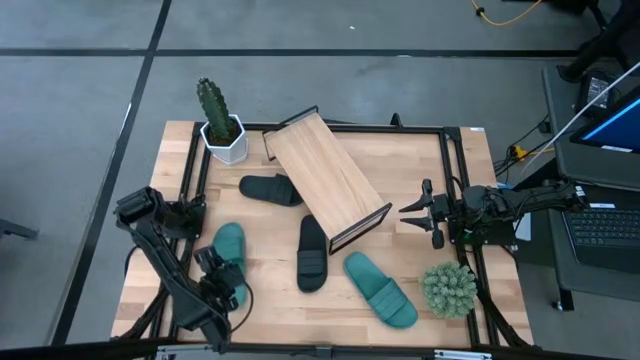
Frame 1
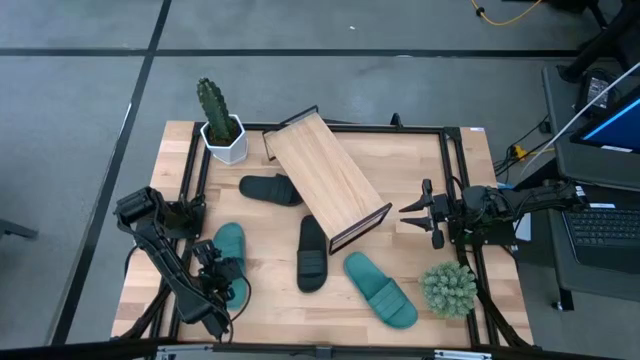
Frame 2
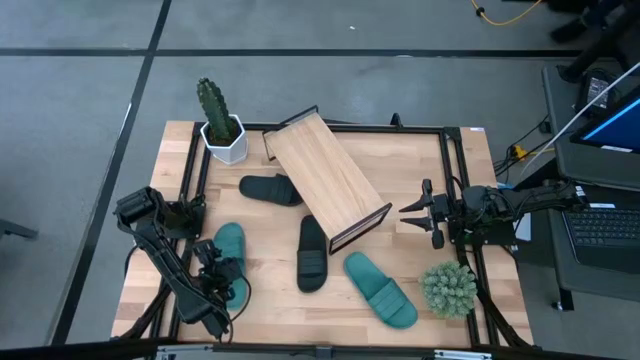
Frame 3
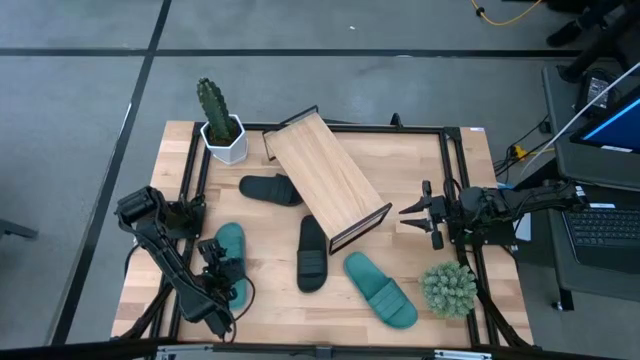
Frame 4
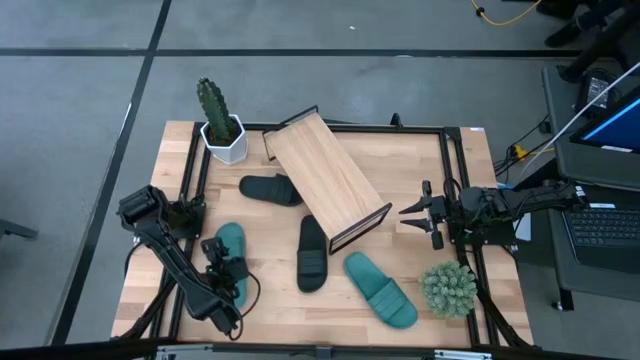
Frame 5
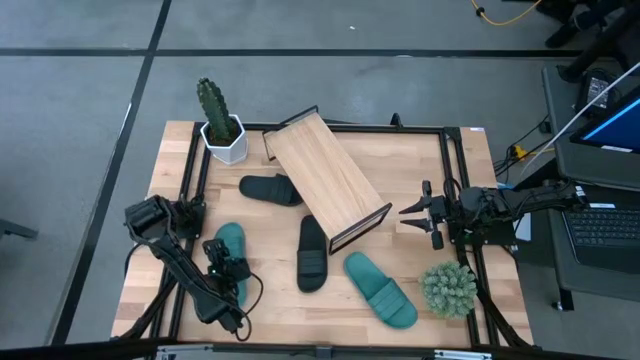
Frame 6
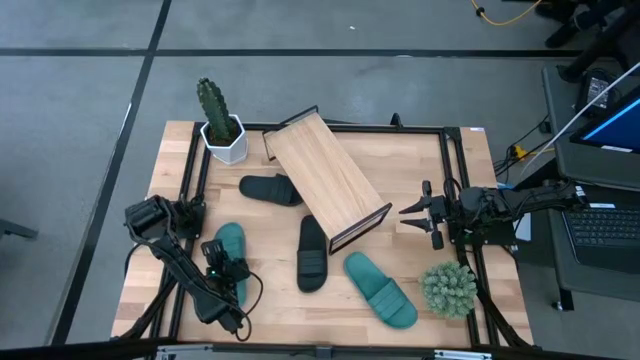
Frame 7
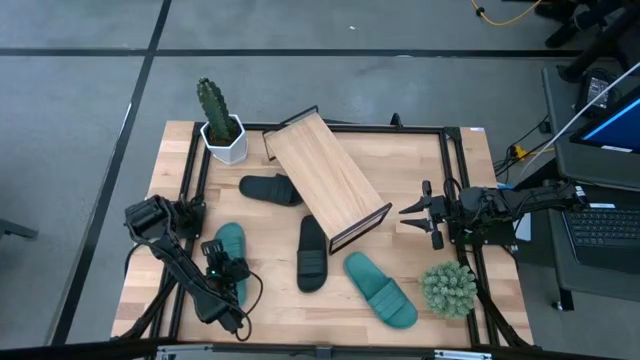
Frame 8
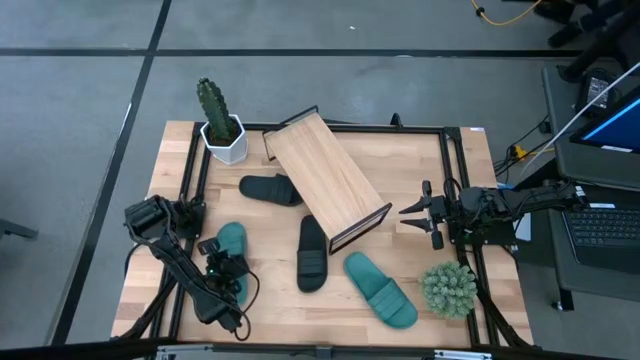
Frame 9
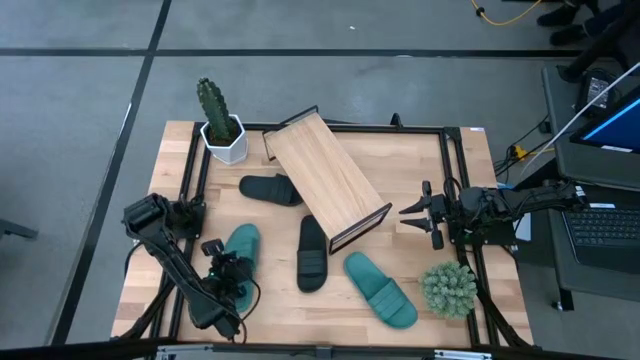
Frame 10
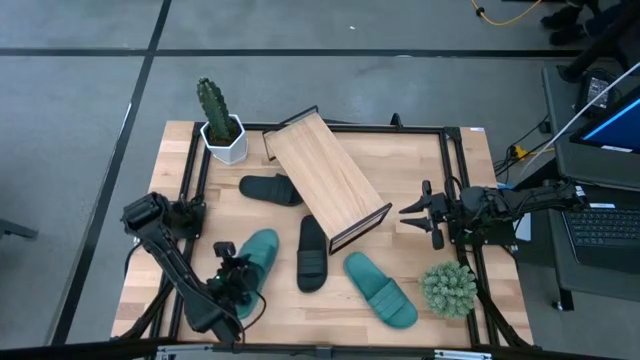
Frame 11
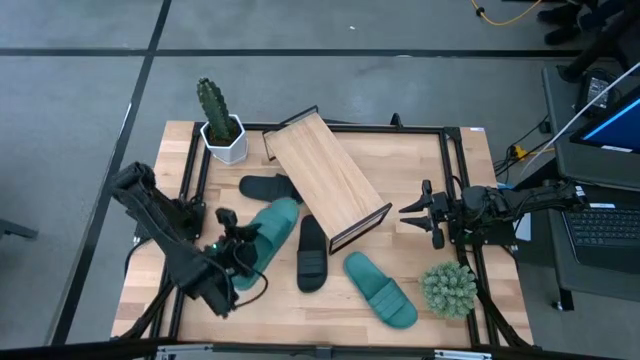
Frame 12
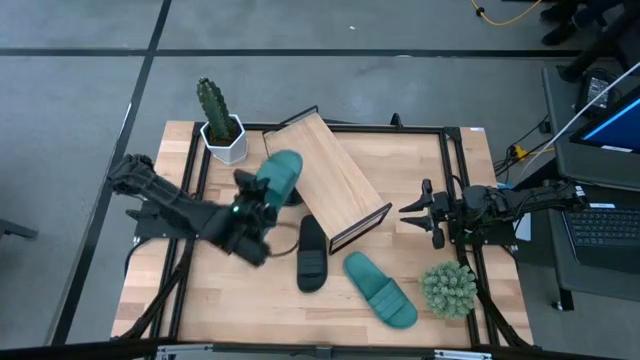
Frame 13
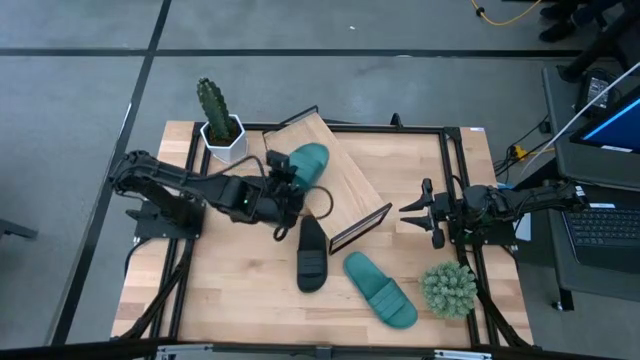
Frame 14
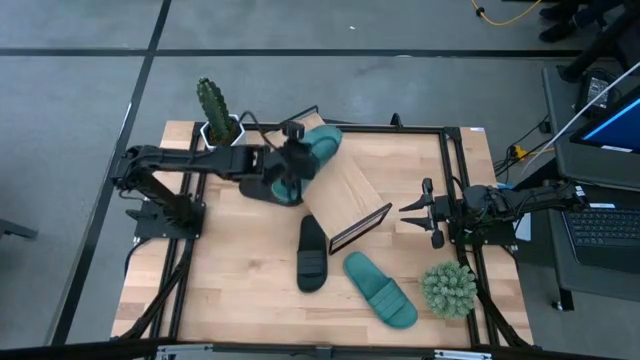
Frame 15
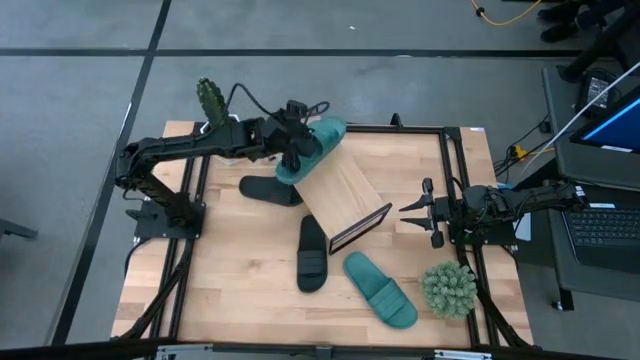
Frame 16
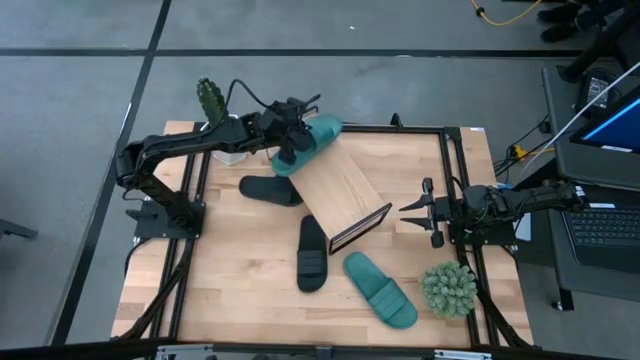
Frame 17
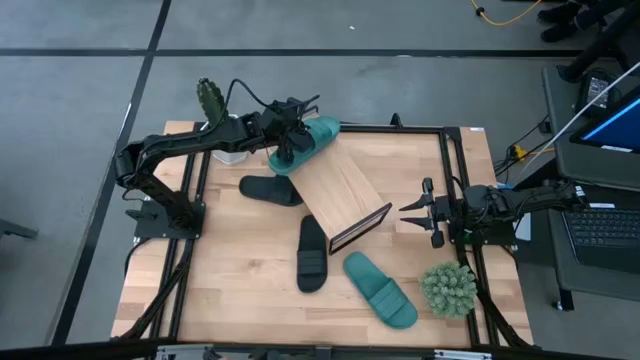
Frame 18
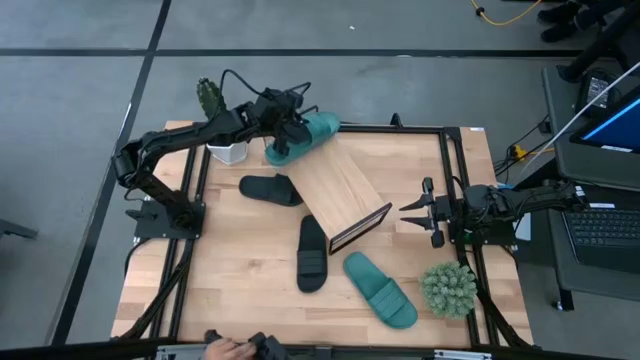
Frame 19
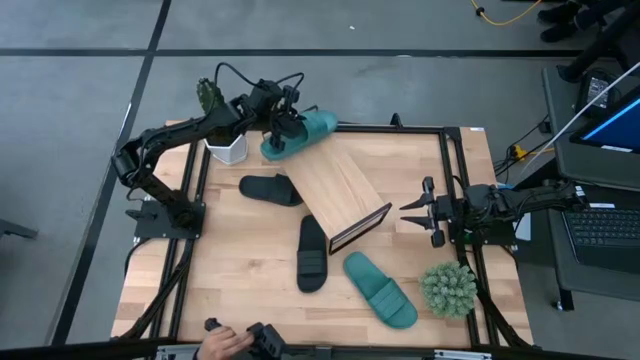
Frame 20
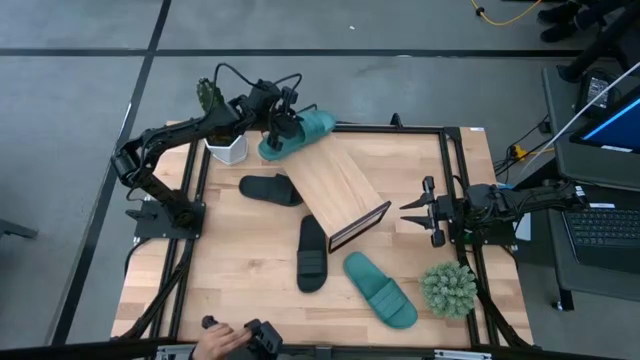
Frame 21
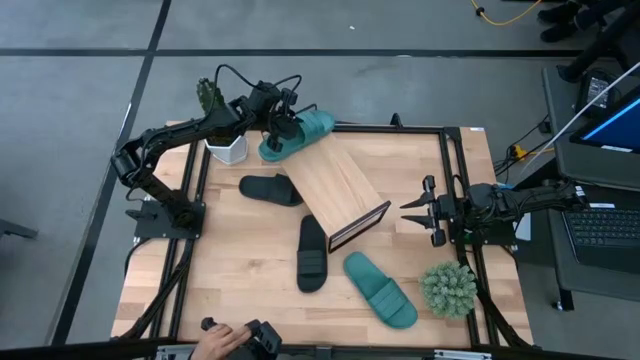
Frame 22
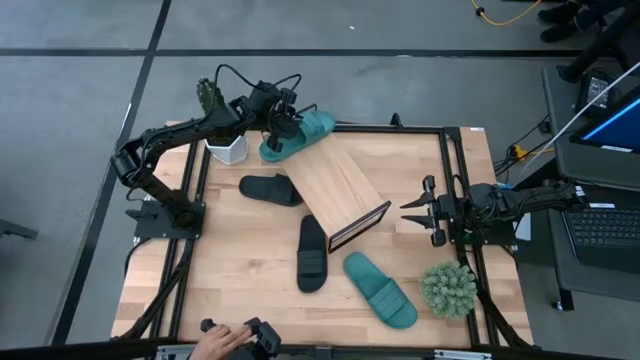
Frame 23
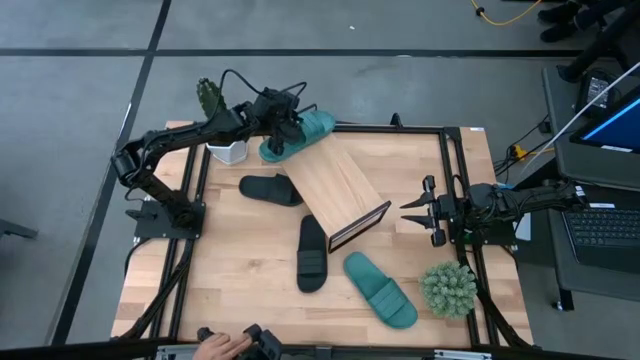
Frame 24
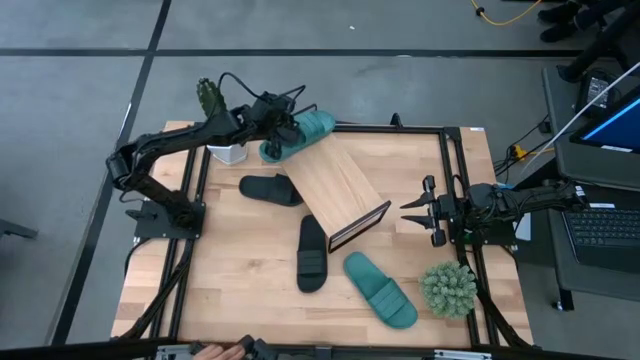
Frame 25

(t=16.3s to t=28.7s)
Task: Pick and place slides into the shelf
Put the left green slipper onto the shelf

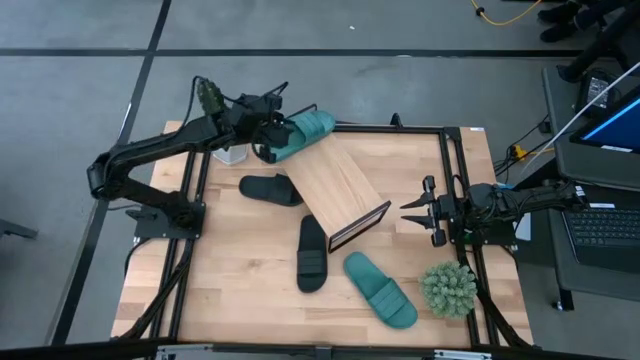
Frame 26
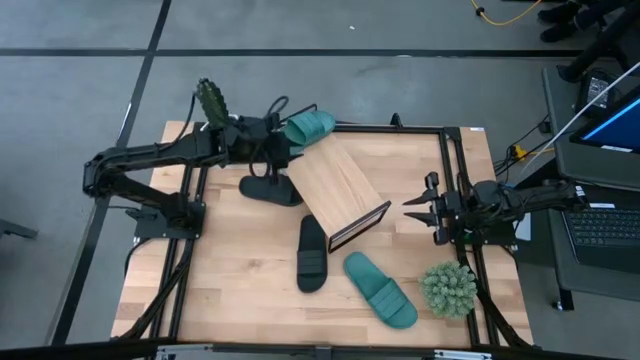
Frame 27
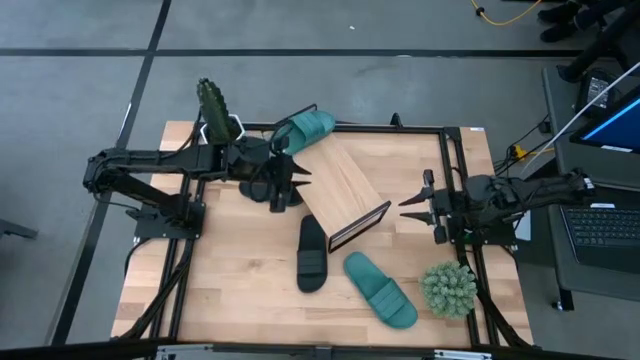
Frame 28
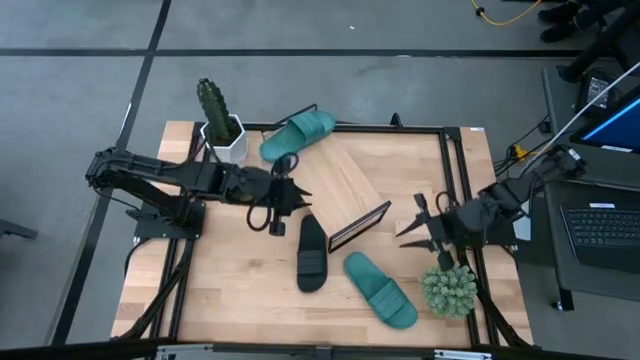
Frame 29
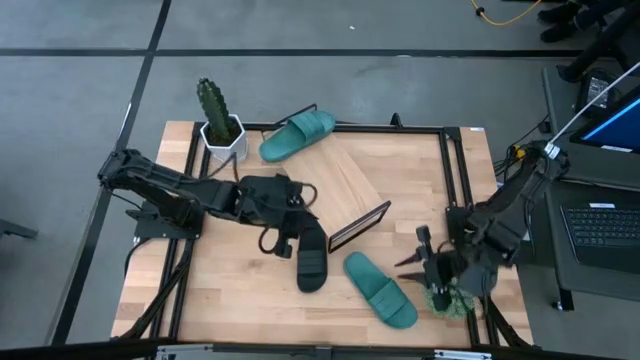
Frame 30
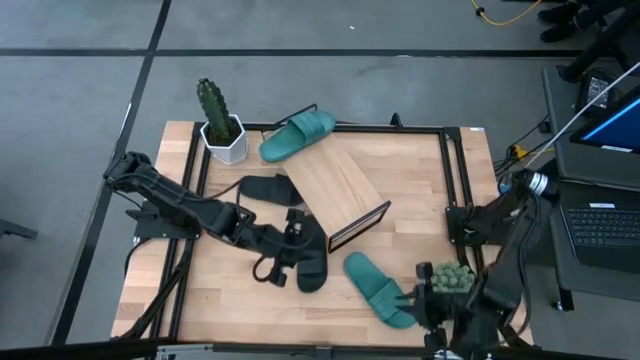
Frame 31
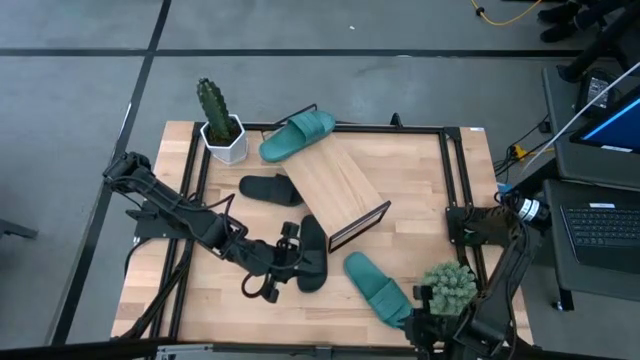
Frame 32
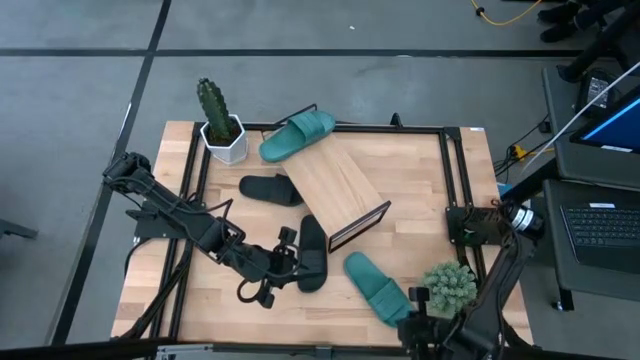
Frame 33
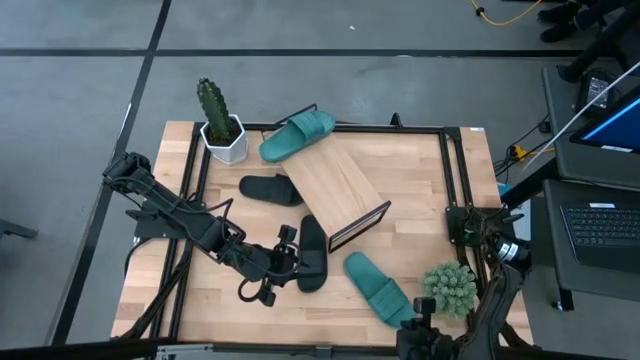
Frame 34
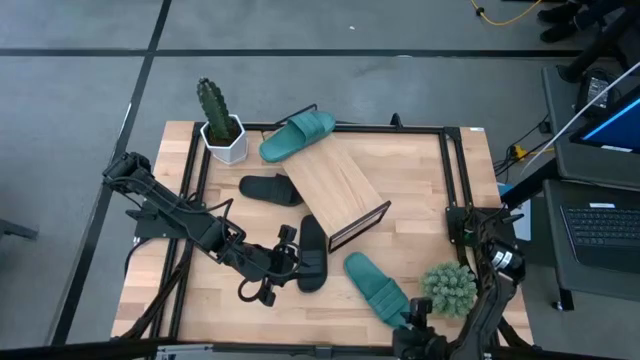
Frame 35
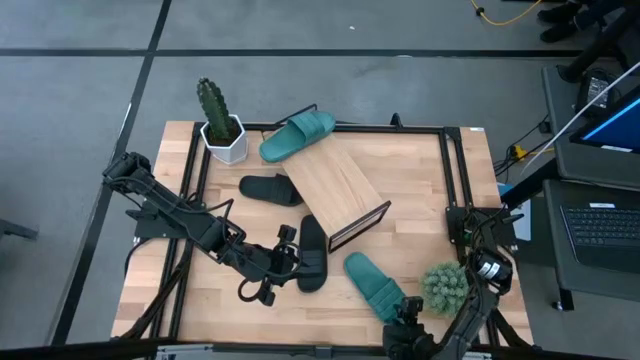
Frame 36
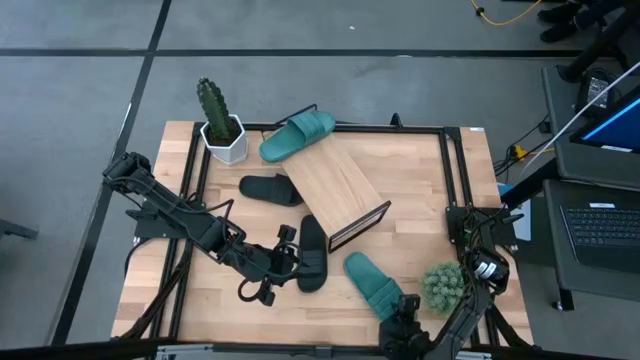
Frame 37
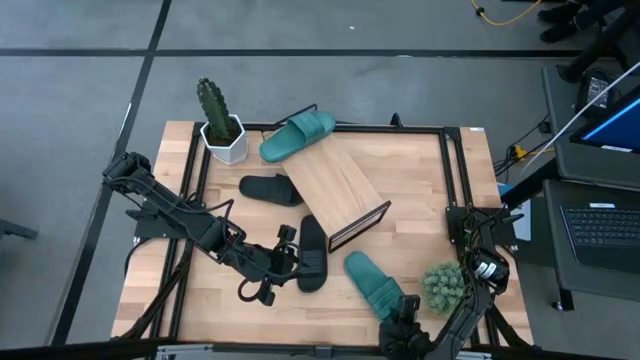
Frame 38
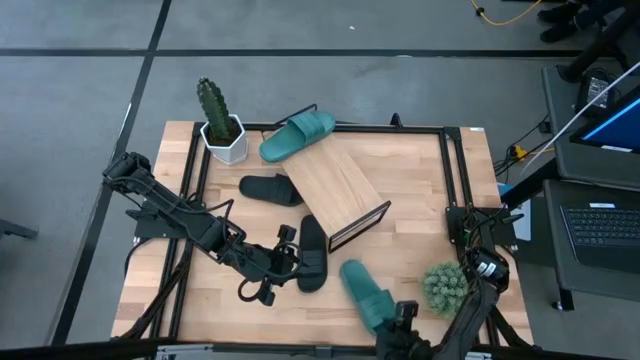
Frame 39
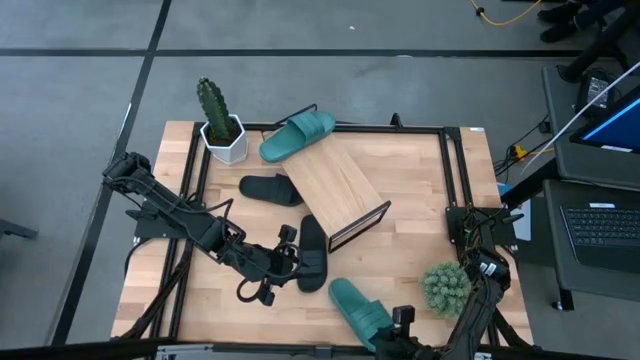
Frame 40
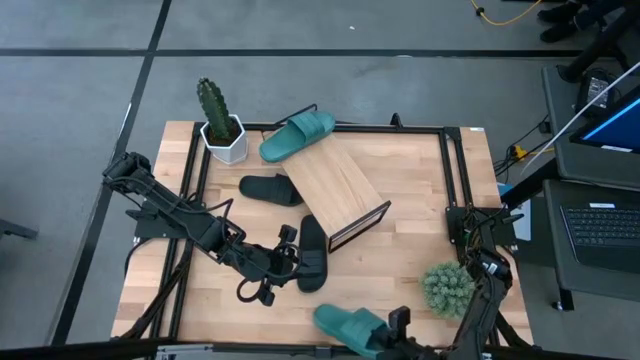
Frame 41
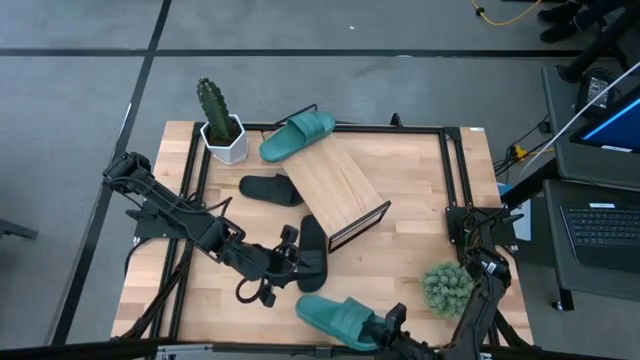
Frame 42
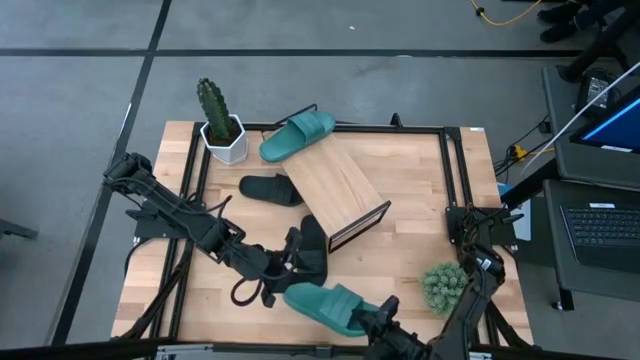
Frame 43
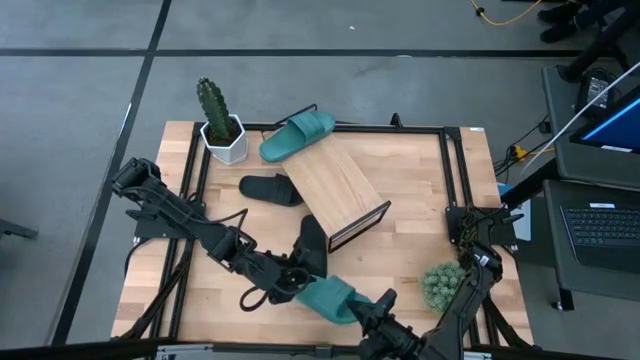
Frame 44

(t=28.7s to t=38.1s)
Put the green slipper onto the shelf
